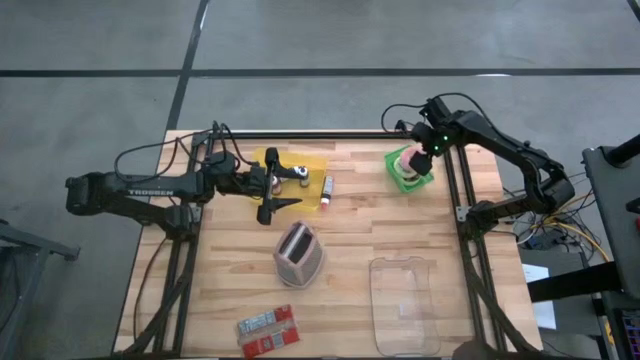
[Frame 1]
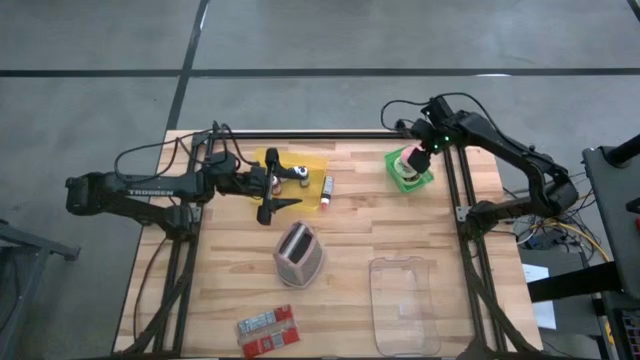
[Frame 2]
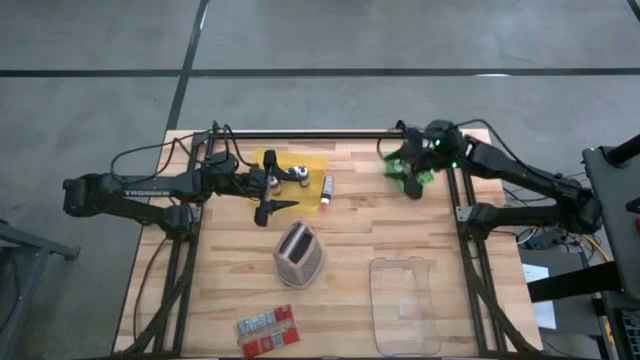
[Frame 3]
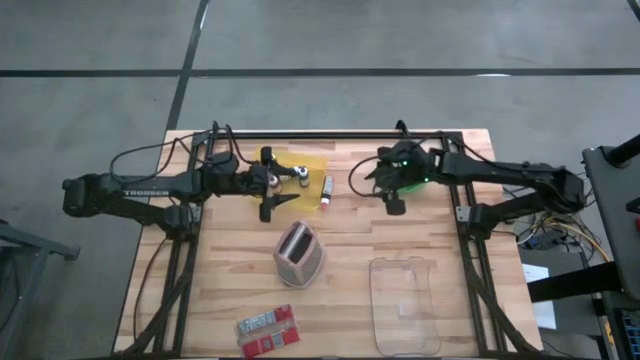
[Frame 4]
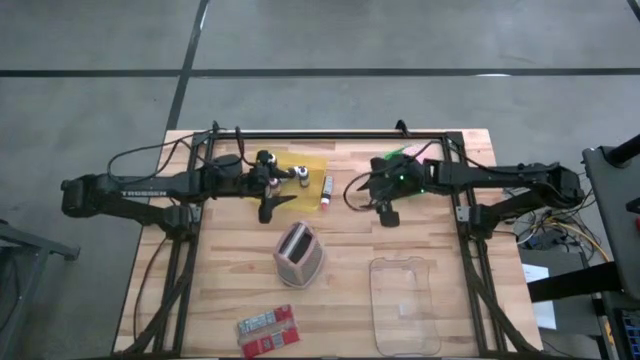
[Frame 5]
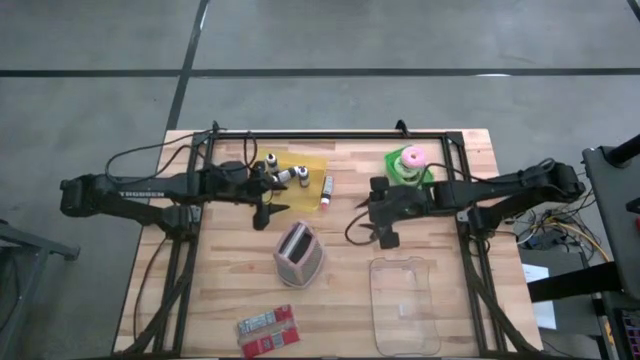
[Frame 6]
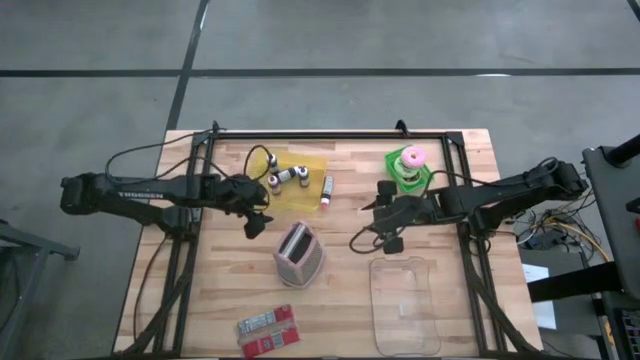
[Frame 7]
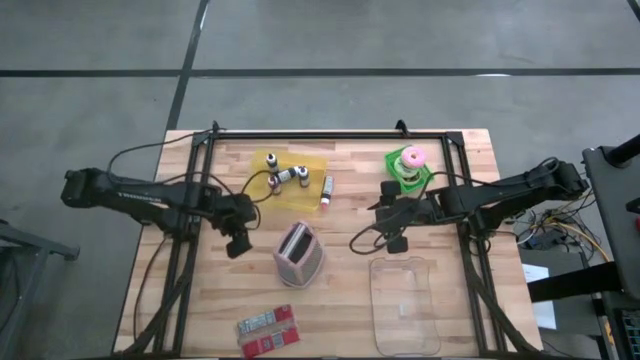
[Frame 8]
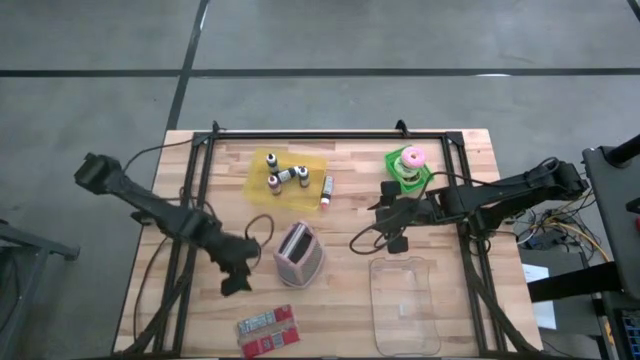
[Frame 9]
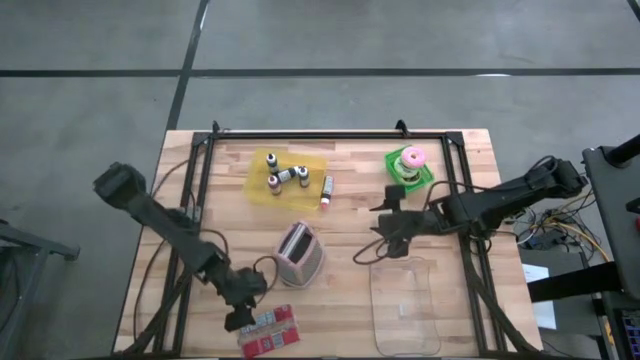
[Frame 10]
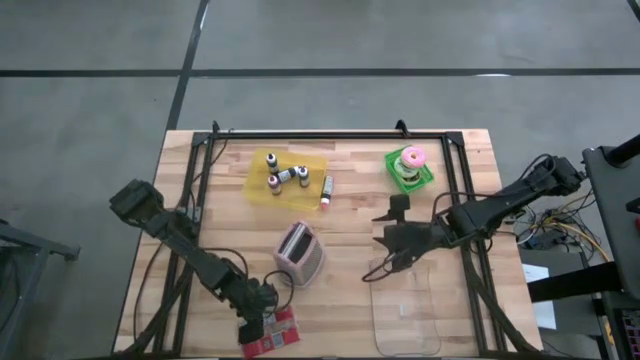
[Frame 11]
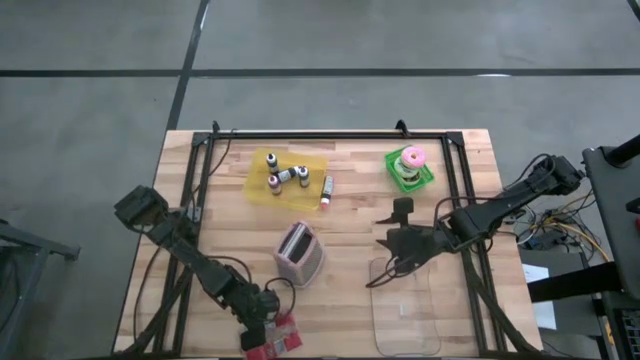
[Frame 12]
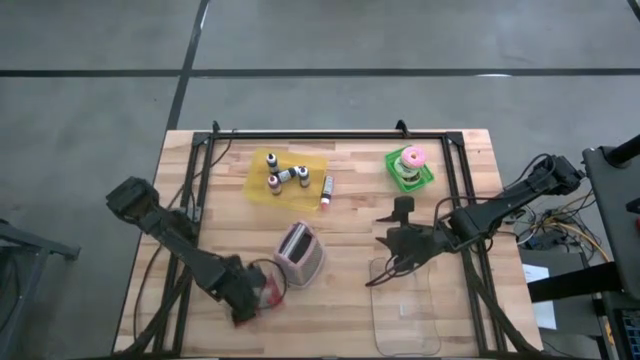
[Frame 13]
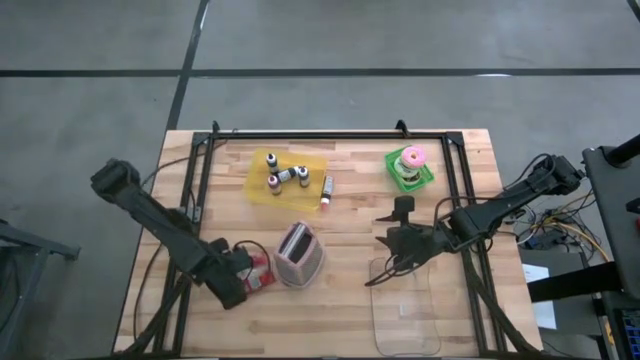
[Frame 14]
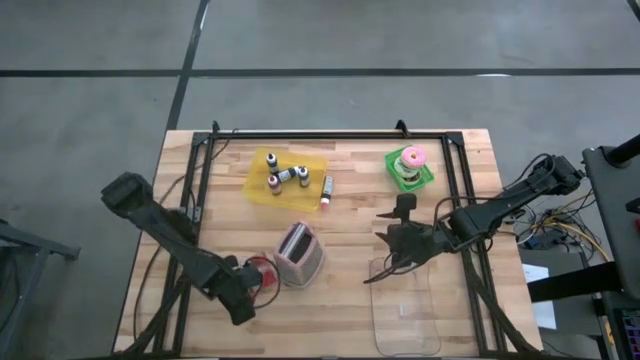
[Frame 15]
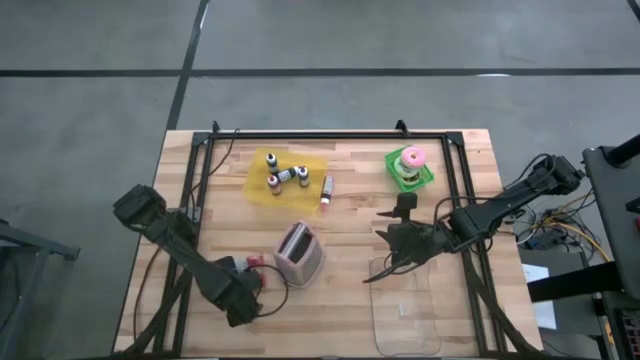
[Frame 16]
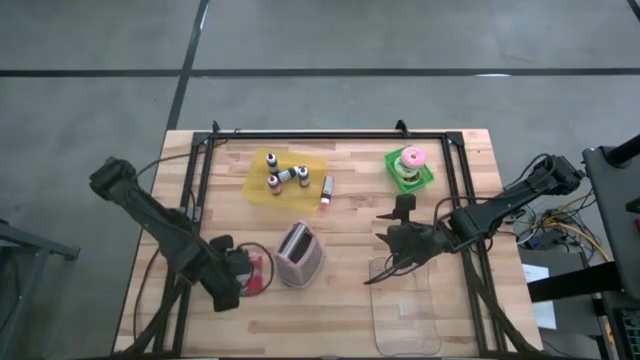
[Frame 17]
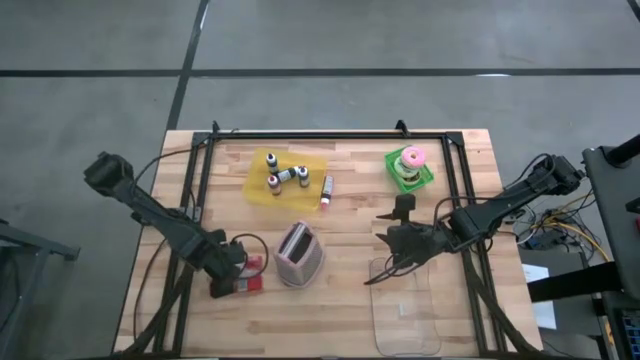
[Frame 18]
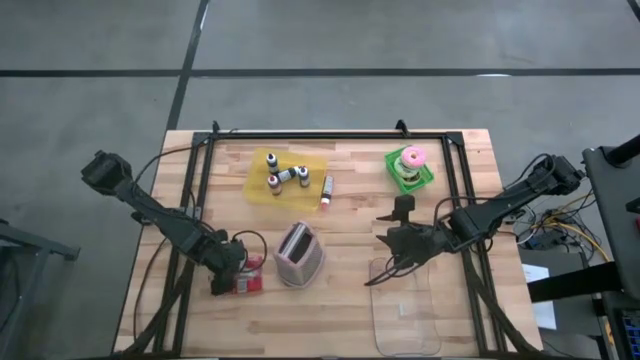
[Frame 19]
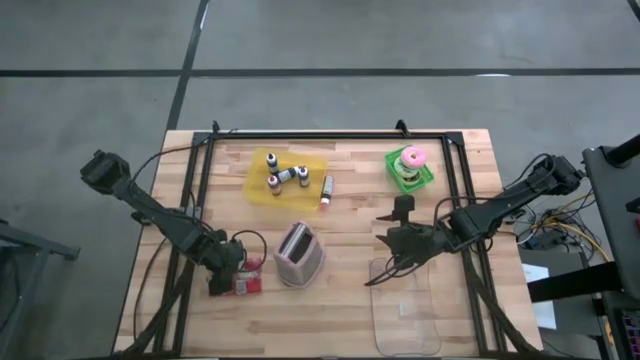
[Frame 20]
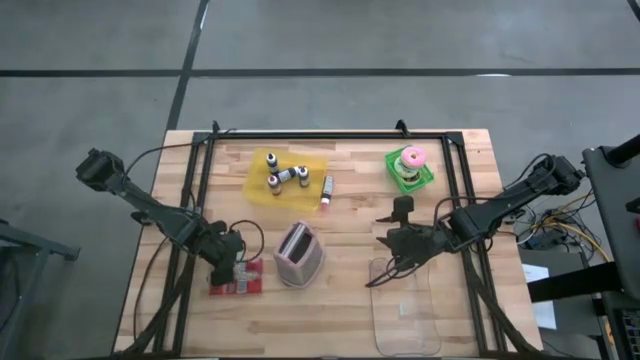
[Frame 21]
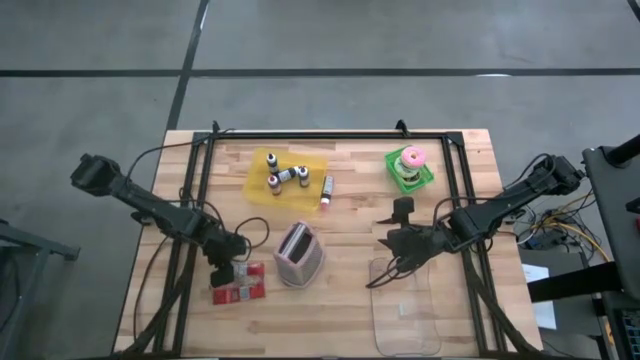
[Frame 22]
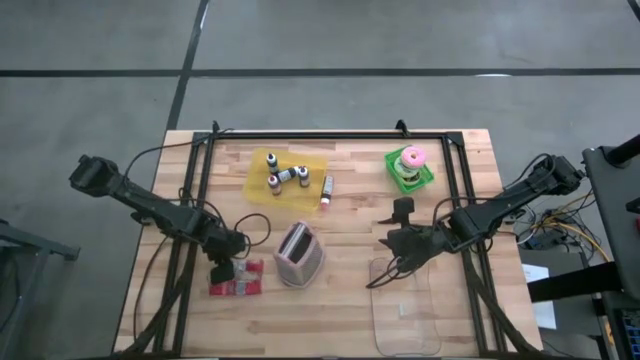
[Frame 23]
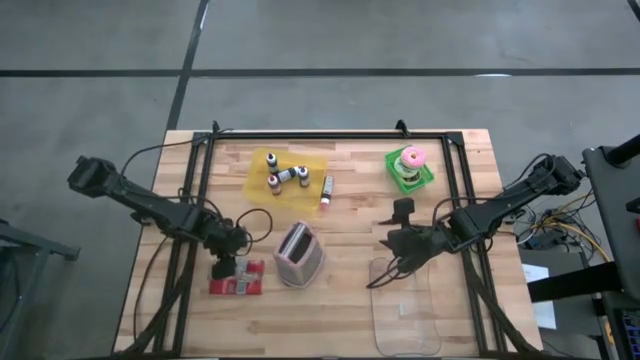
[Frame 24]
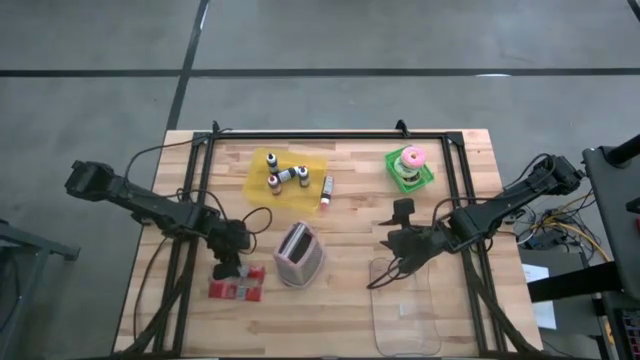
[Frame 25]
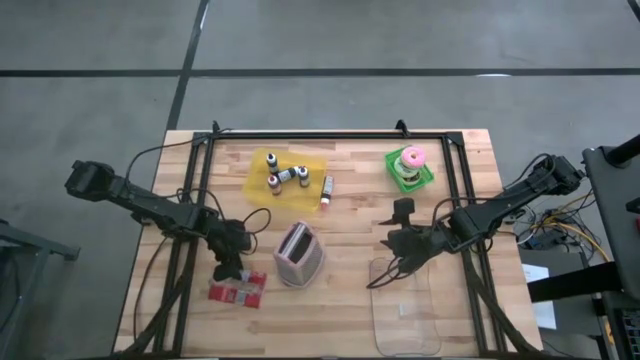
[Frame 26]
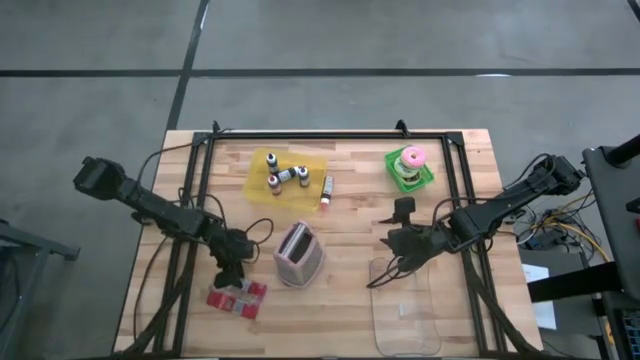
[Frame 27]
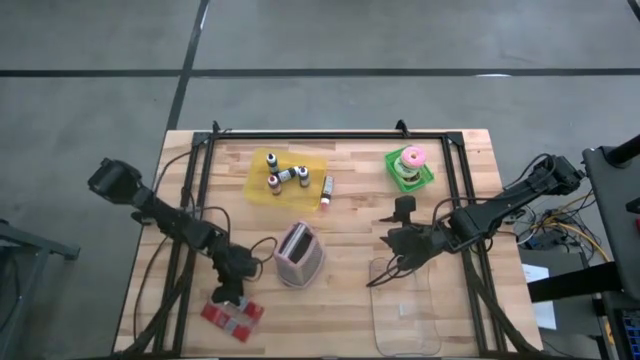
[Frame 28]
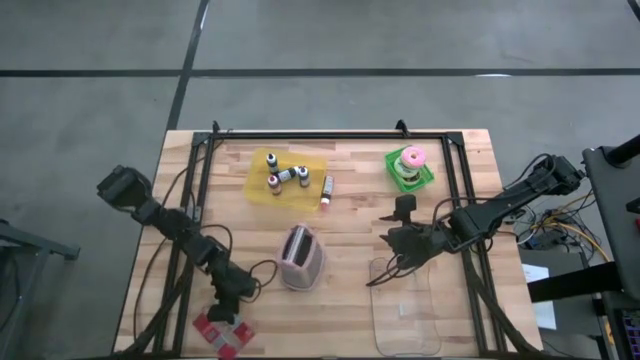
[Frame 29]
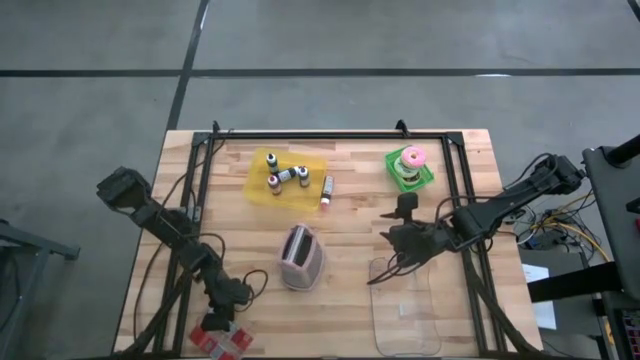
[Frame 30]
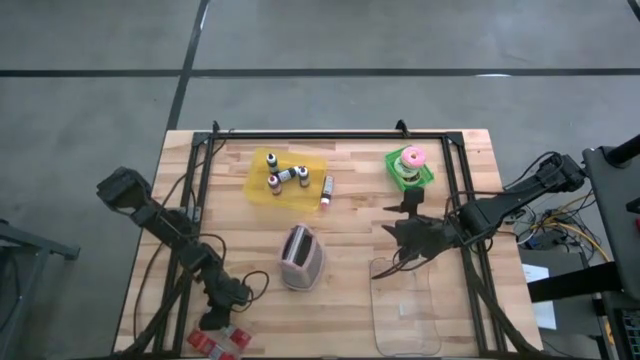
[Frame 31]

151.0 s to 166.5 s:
Task: Pick & Place Food Item
Put the popcorn bag into the transparent bin

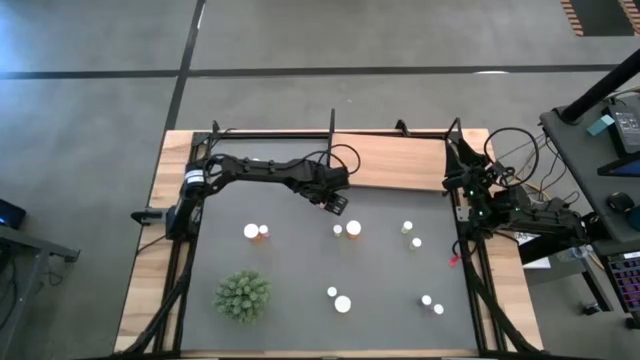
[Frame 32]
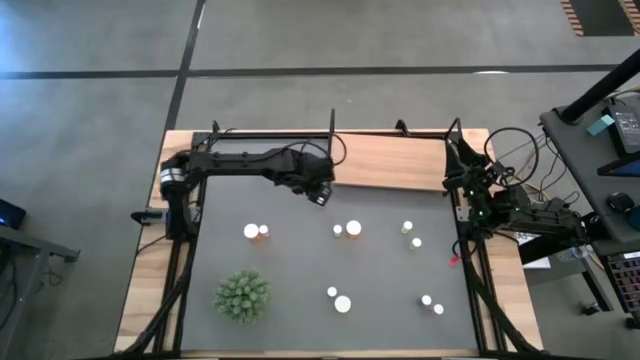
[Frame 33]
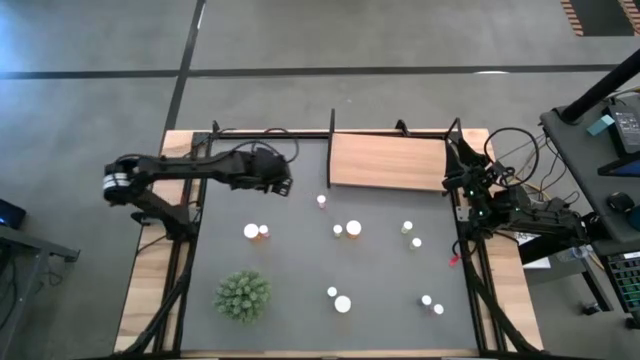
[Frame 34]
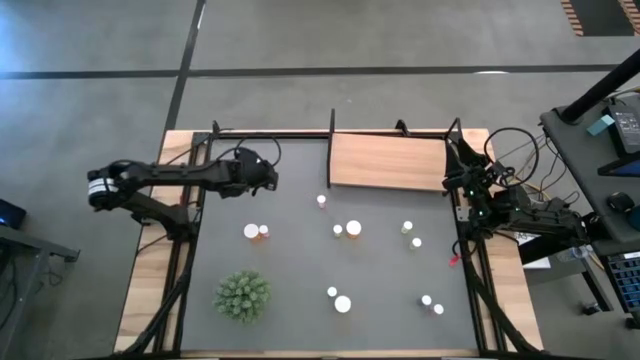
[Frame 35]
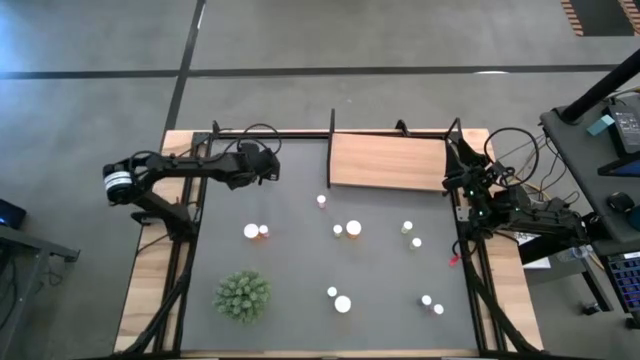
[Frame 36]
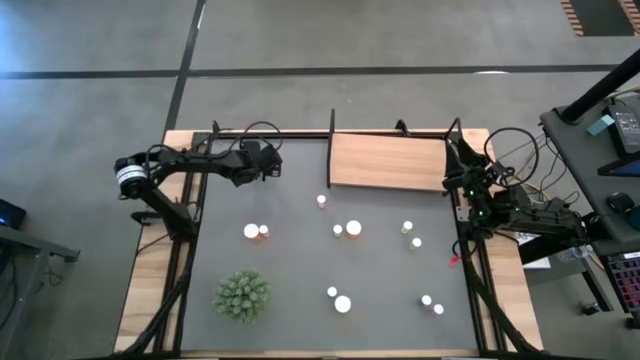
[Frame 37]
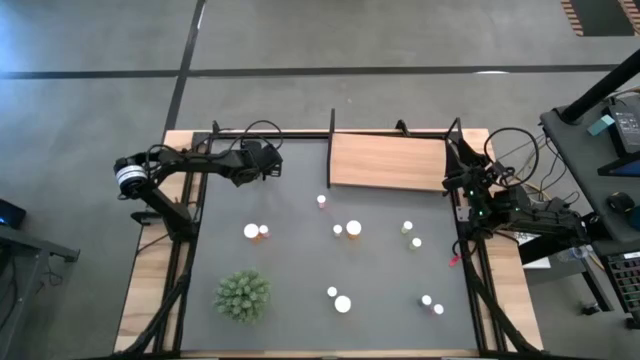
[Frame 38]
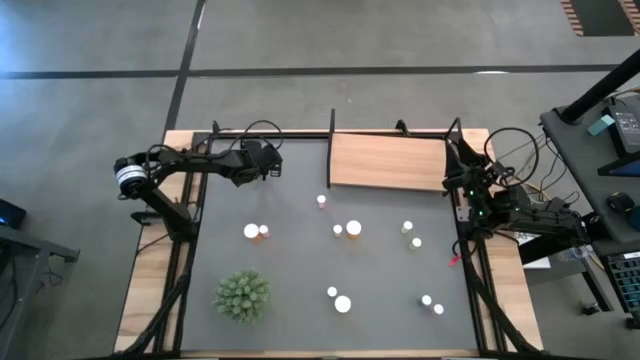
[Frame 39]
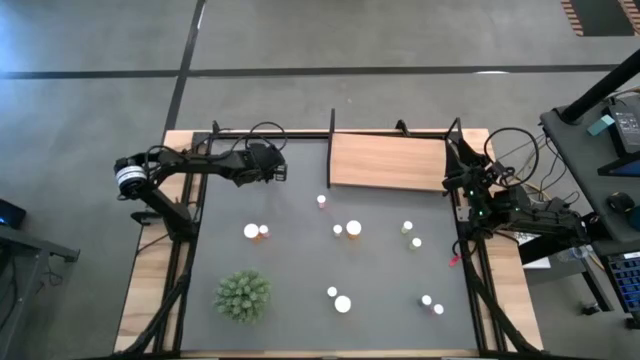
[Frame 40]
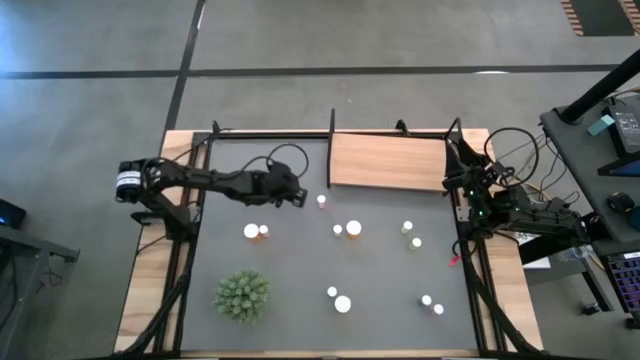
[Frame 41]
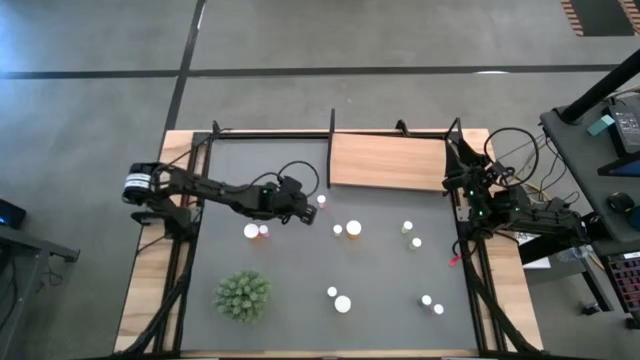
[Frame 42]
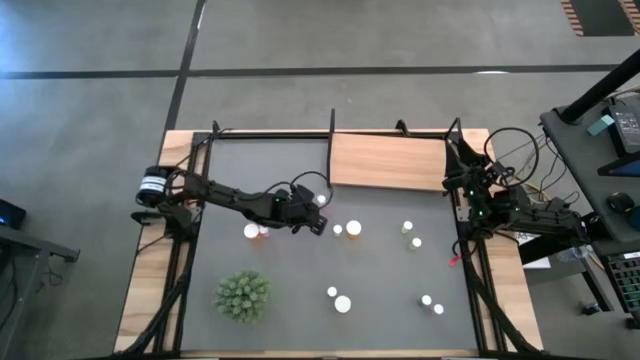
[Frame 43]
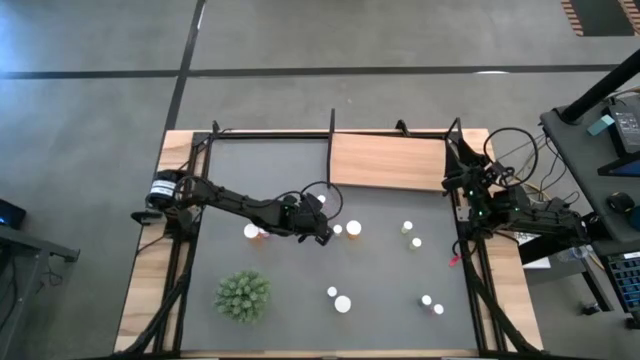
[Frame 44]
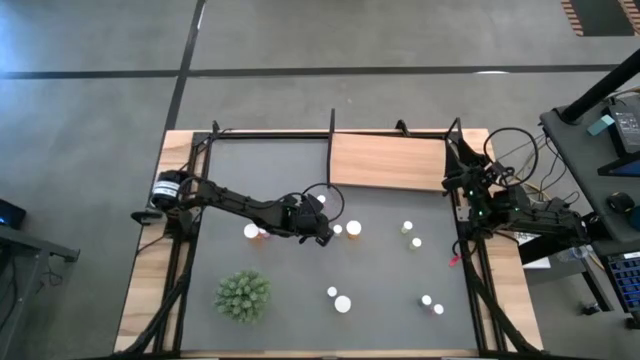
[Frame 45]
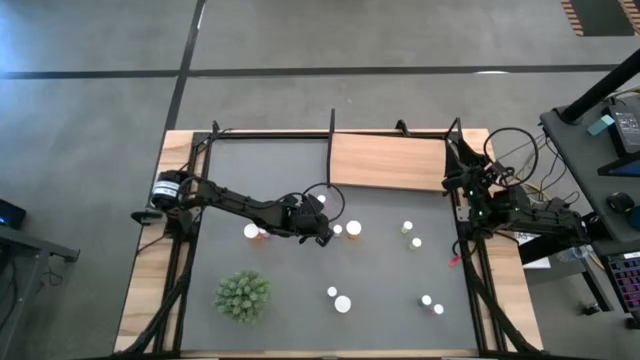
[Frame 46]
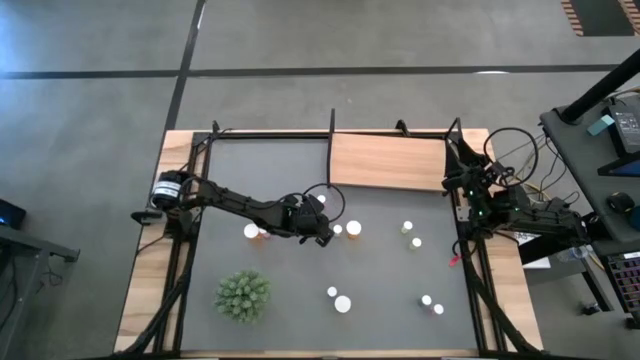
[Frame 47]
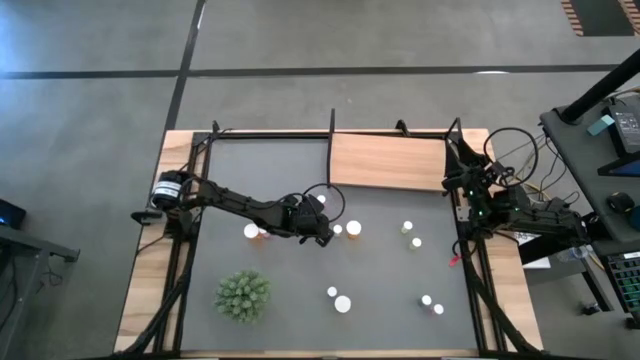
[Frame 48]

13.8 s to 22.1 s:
Task: Pick and place medicine bottles onto shelf by color
Move the top blue pill bottle from the top to the center of the table
